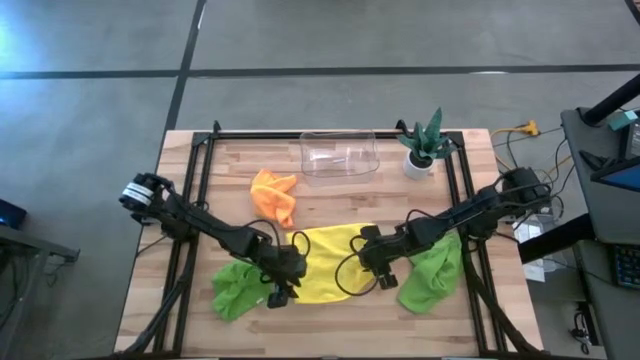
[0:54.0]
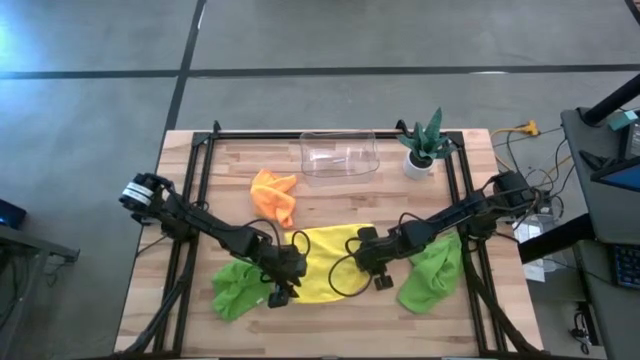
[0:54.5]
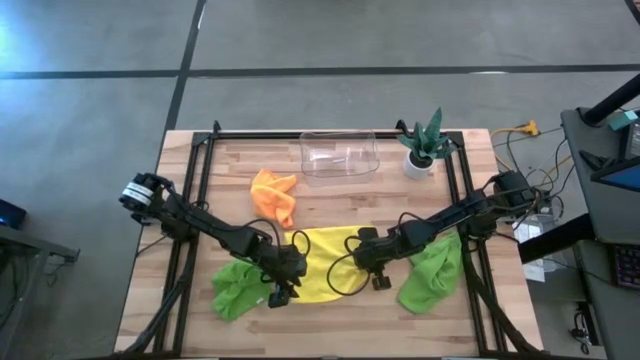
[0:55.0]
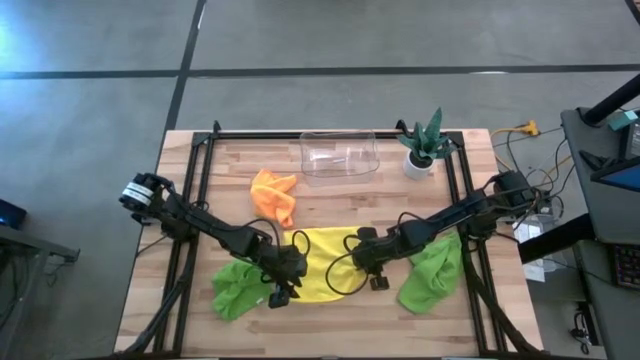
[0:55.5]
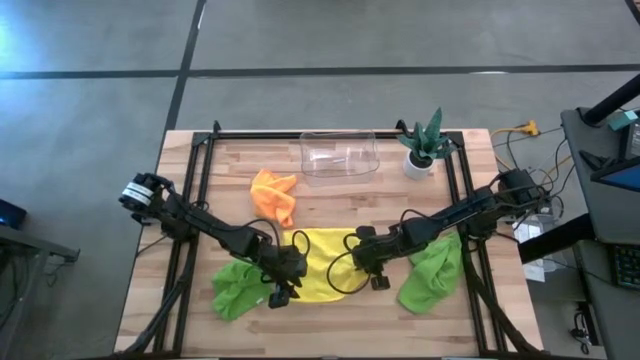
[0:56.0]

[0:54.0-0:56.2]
Task: Fold microfiber towels
Fold the yellow microfiber towel

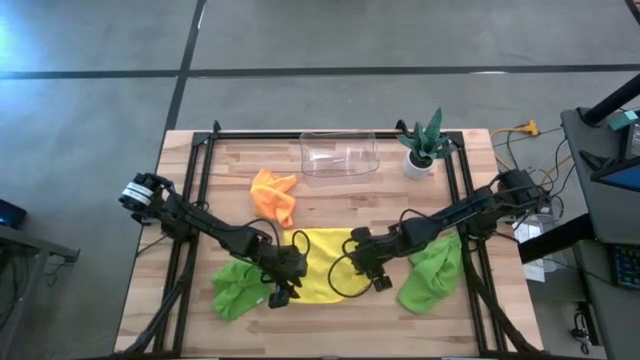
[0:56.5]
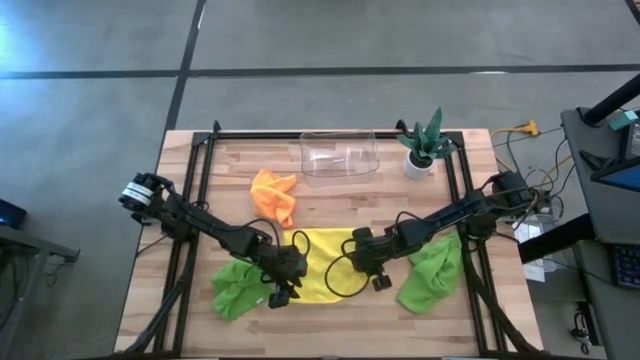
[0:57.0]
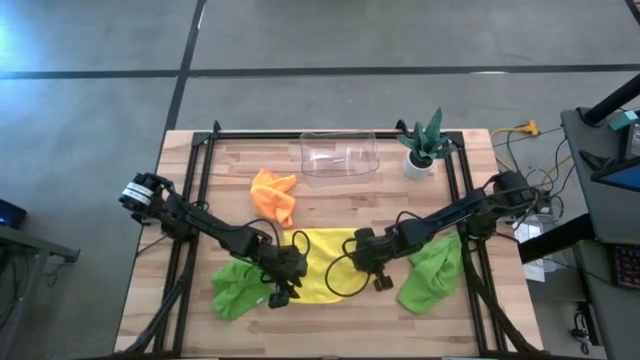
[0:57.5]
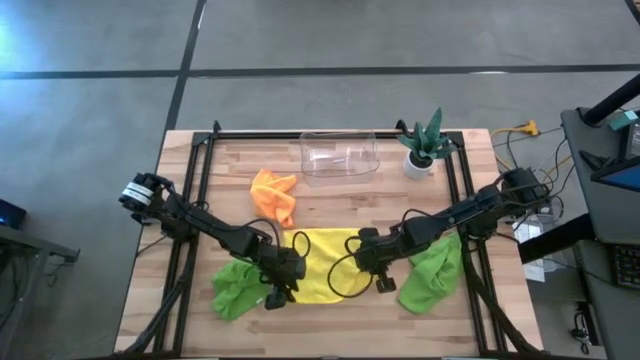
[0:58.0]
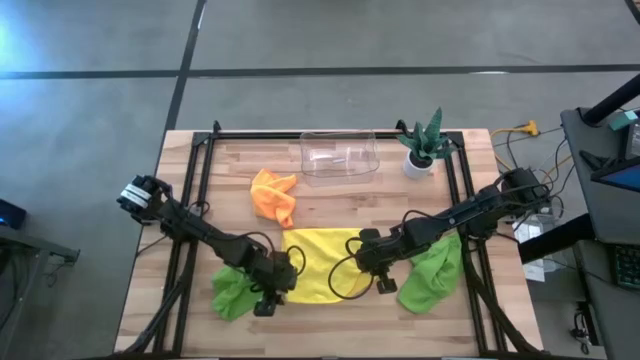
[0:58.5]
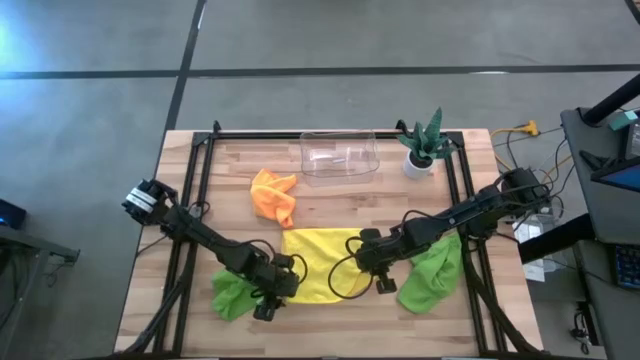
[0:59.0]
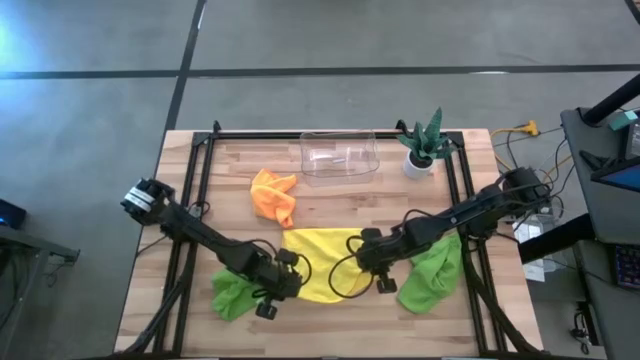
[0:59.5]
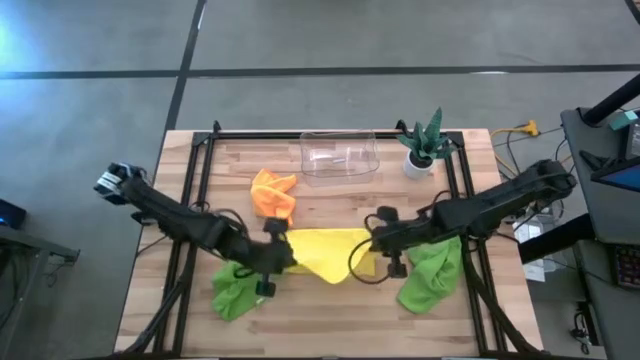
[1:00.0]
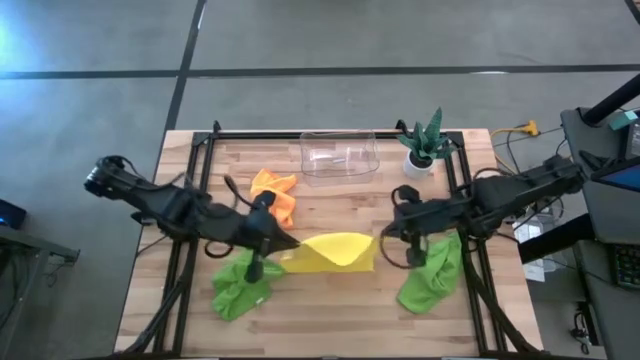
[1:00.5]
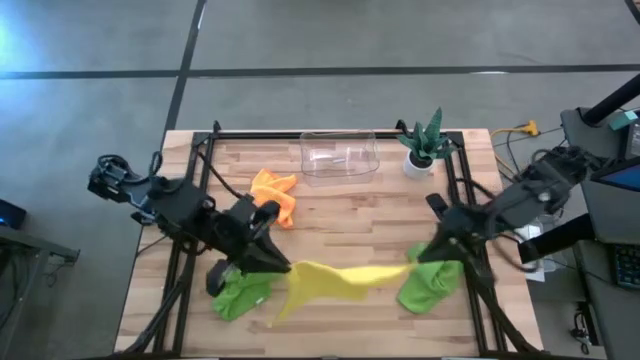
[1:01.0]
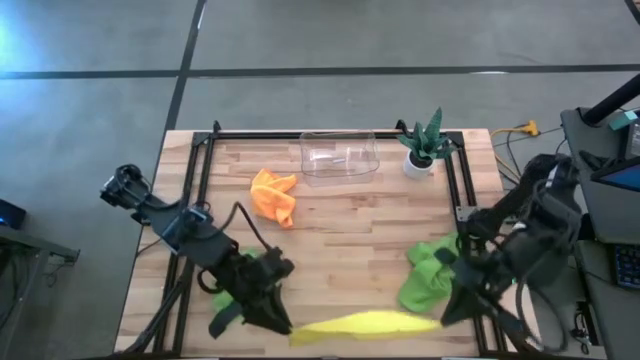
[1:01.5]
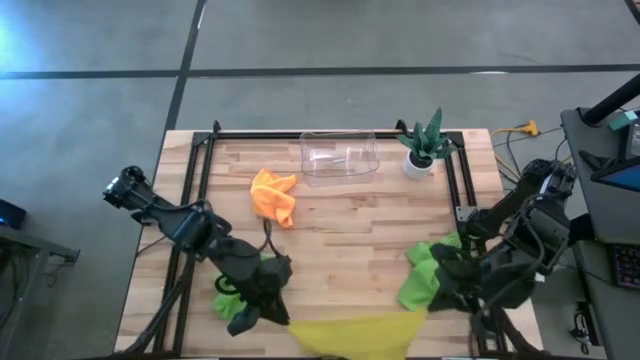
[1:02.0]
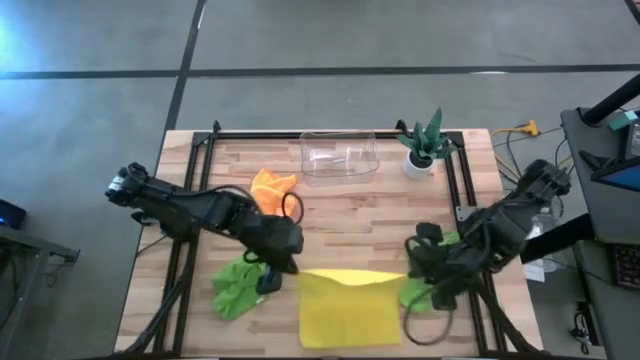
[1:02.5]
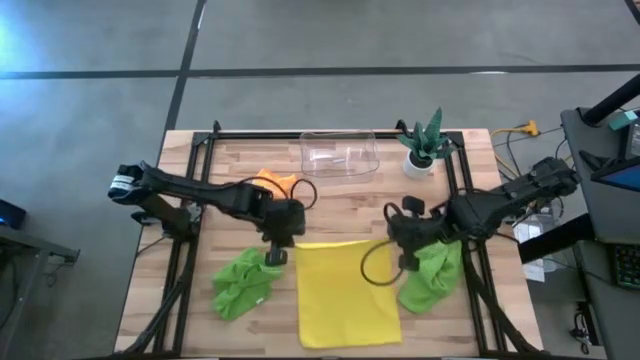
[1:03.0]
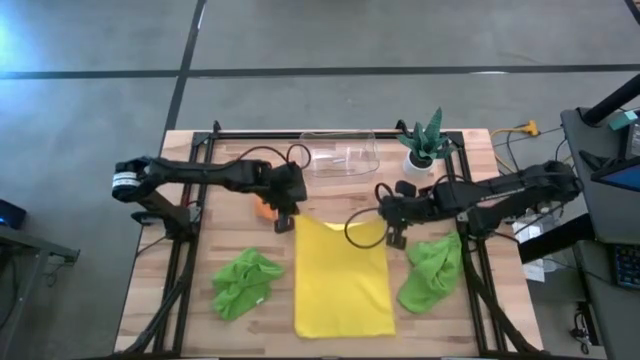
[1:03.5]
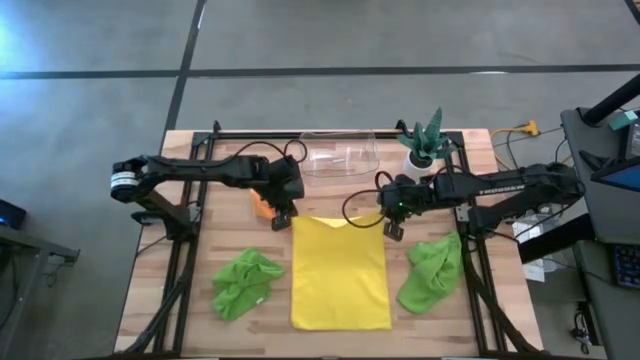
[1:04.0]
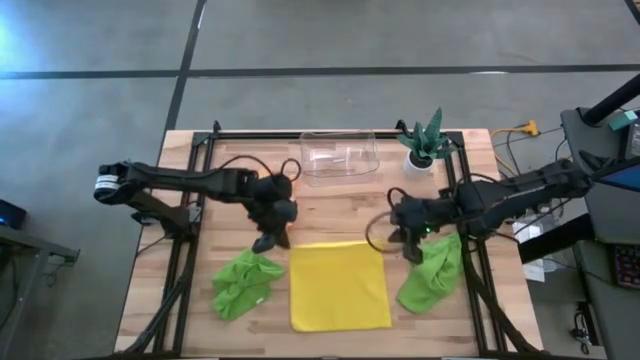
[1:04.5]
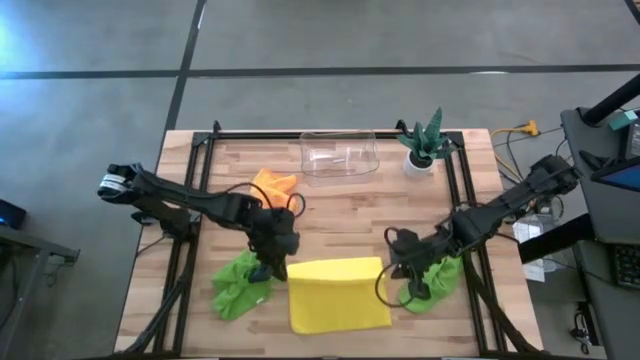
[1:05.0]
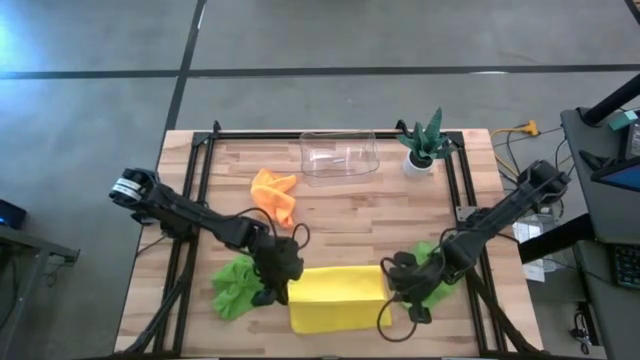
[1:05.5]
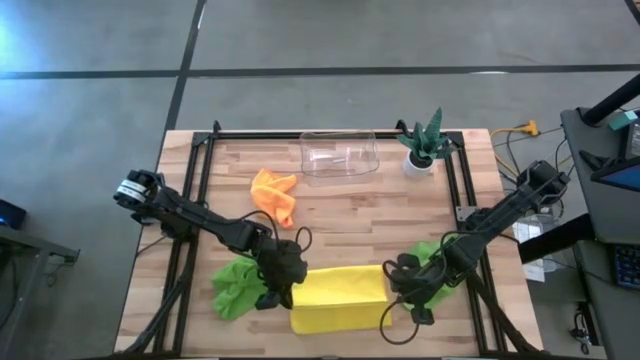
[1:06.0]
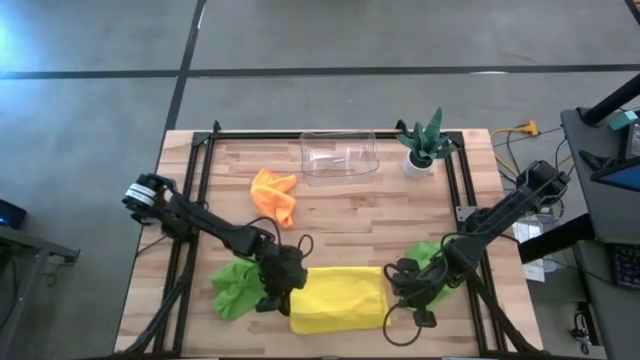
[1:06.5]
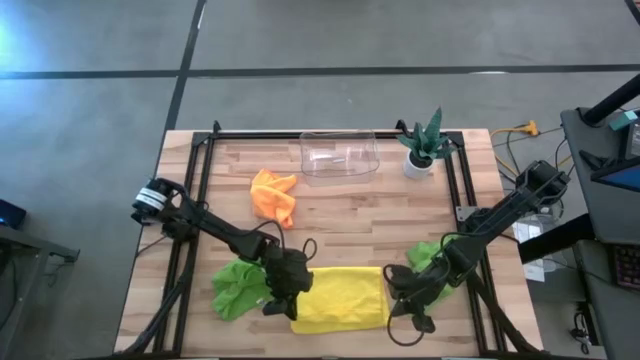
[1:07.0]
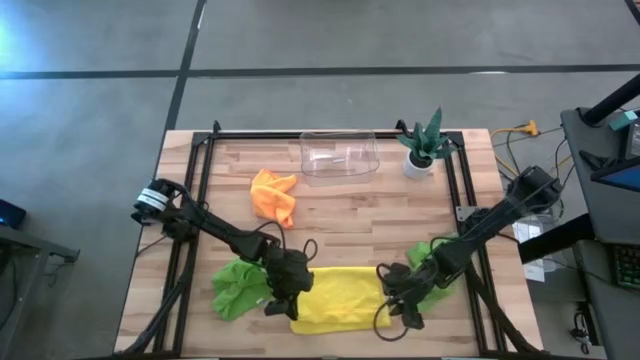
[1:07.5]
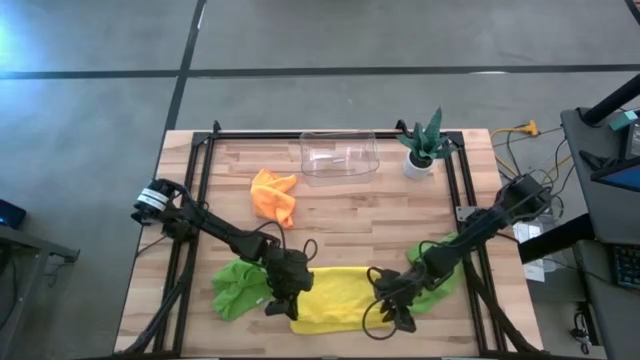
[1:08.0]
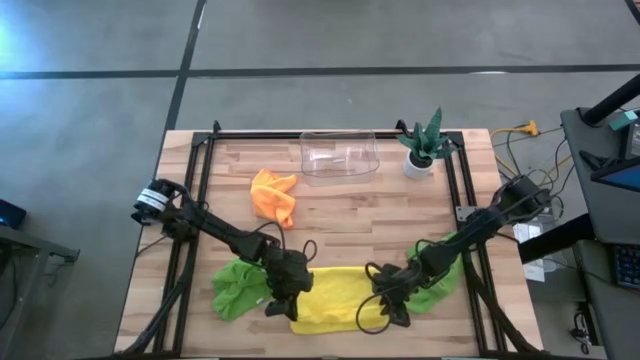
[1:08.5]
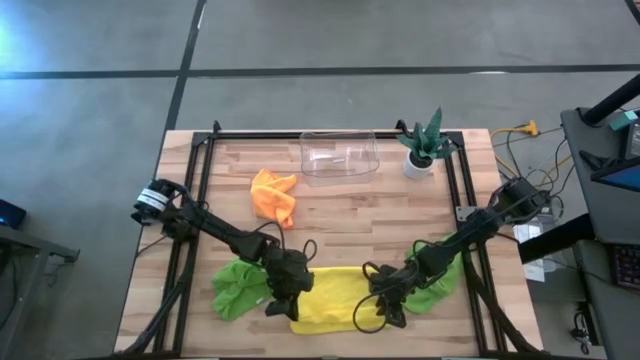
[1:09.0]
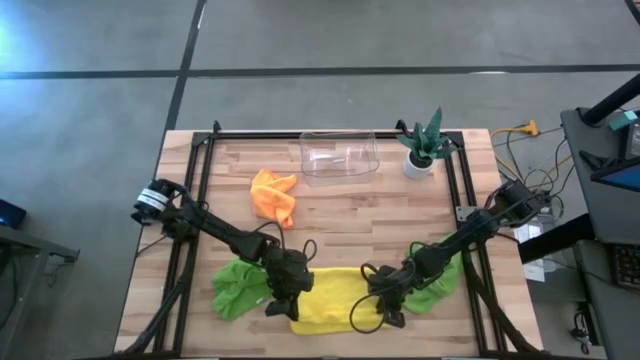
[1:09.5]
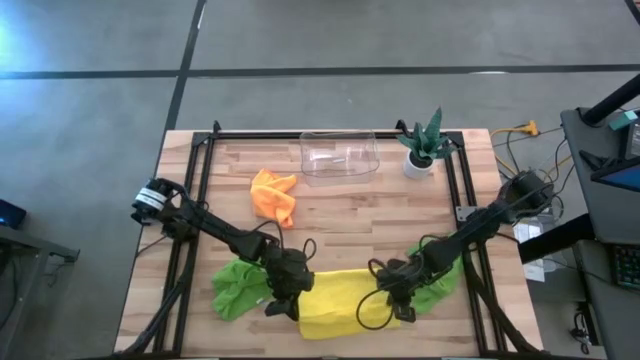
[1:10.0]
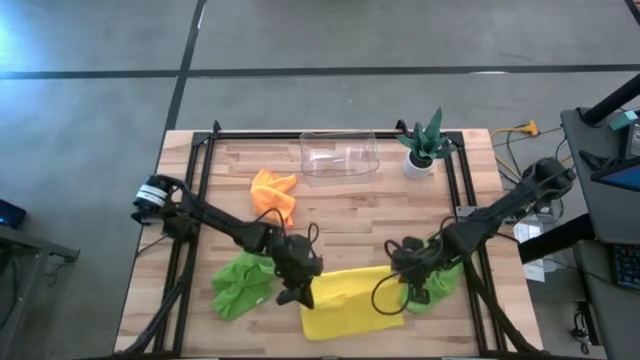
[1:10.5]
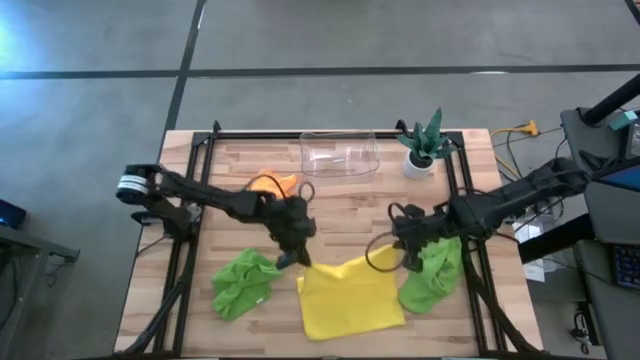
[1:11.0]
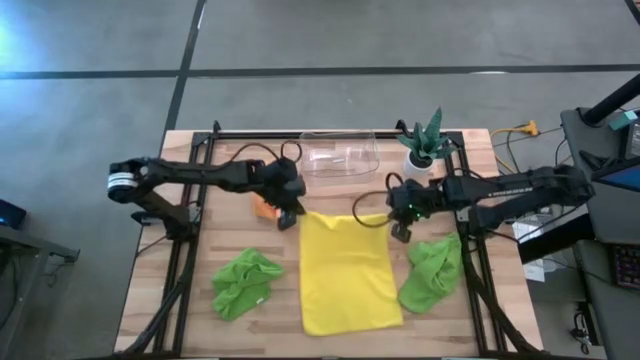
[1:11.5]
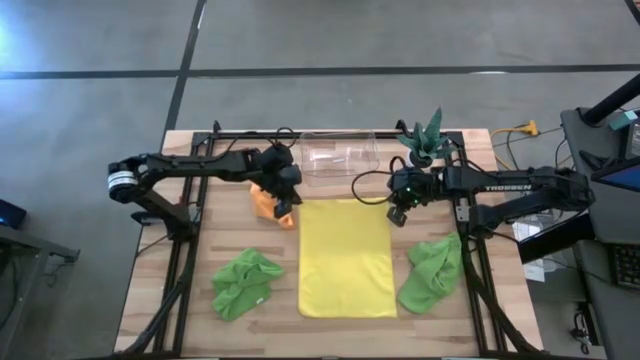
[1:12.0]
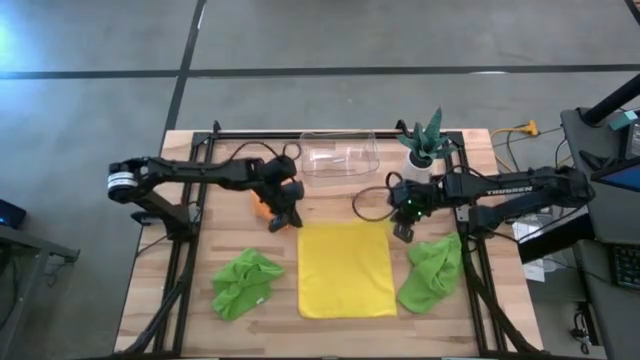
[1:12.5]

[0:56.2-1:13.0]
Fold the yellow microfiber towel

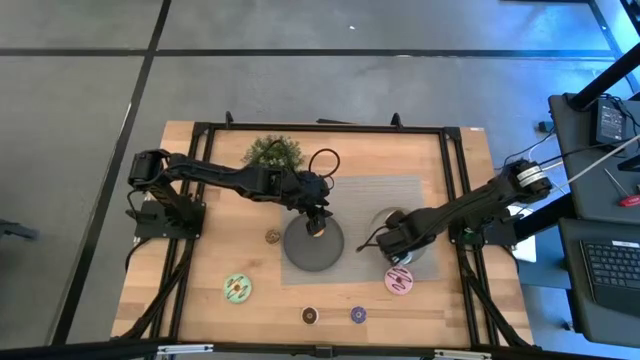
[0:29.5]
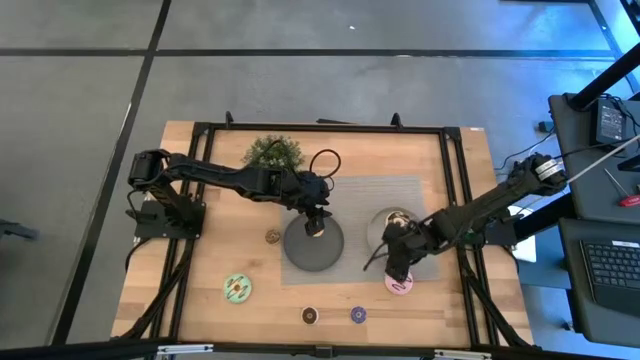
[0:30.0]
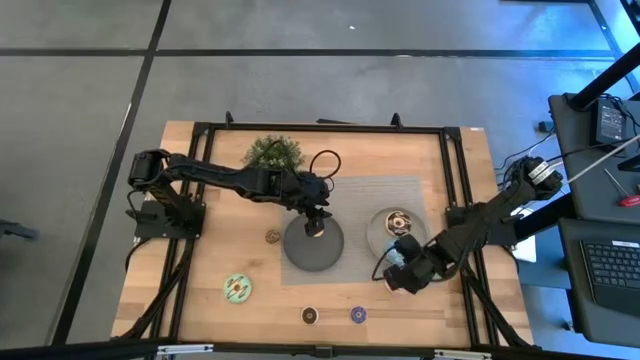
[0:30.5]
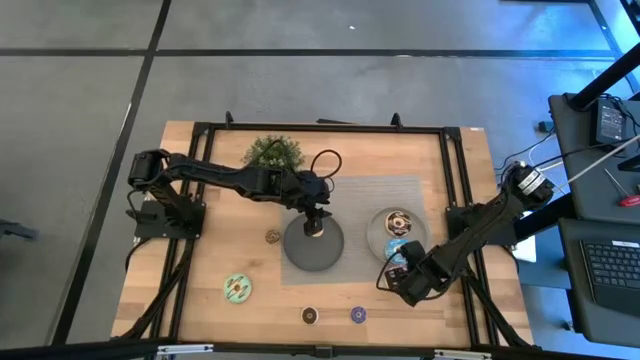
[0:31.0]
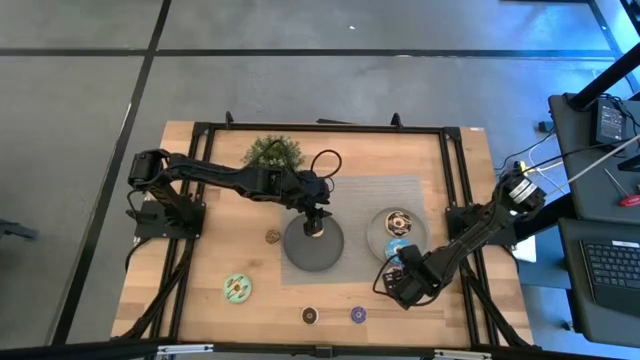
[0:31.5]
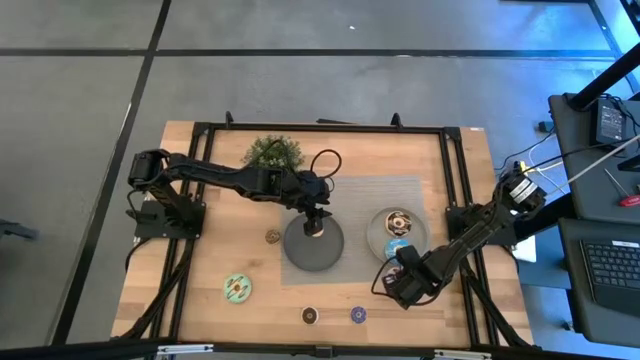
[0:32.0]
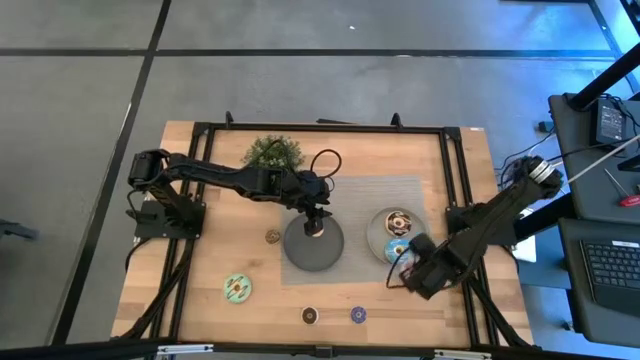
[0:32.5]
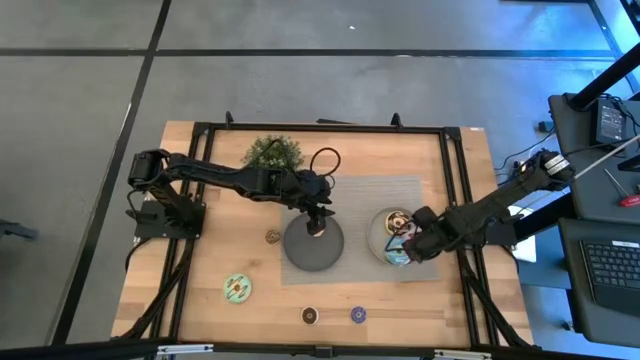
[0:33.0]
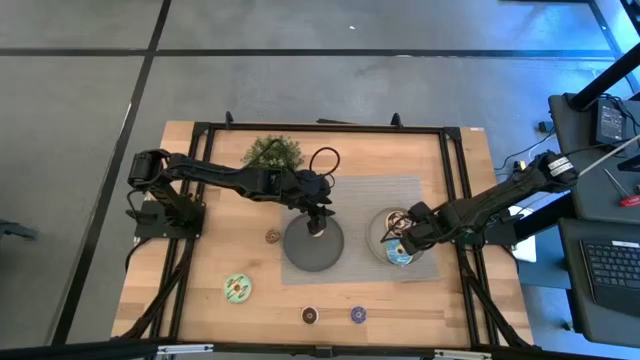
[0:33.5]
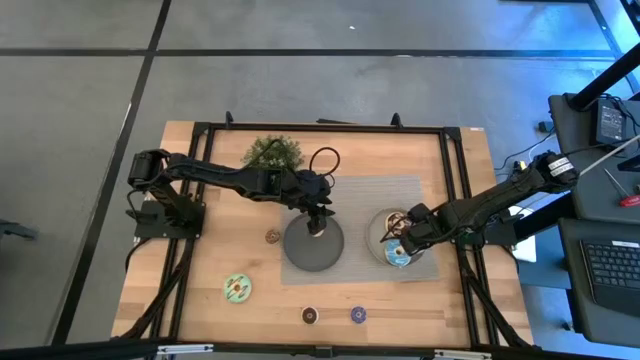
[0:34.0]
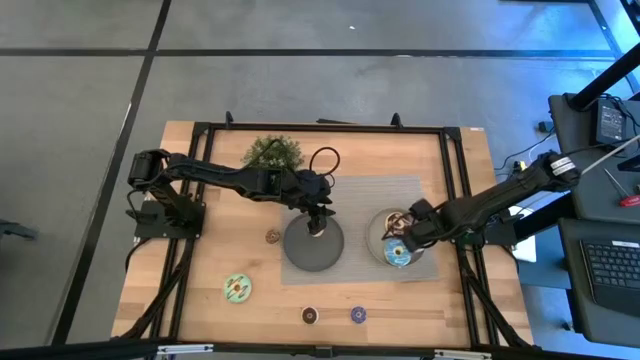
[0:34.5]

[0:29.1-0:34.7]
Task: Pick & Place donuts
Put the large pink donut on the light gray plate
